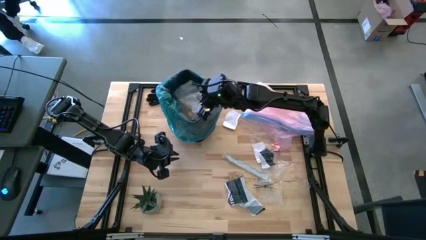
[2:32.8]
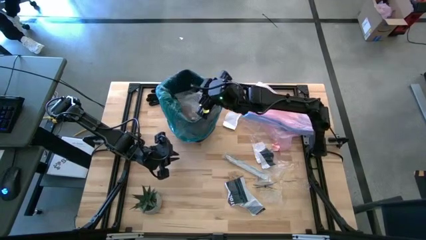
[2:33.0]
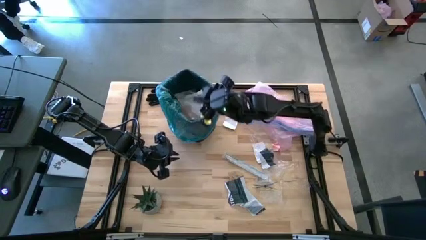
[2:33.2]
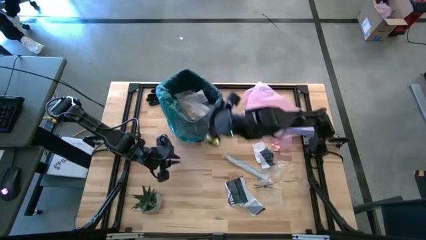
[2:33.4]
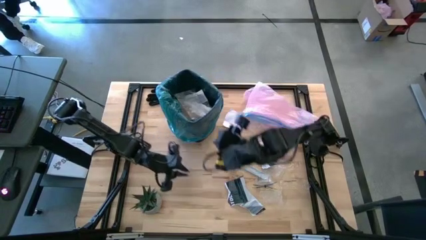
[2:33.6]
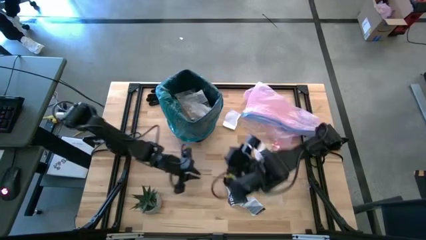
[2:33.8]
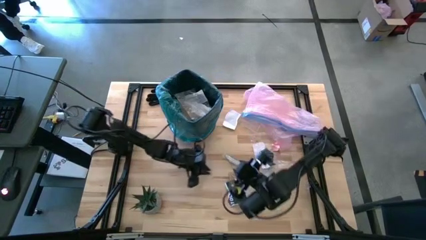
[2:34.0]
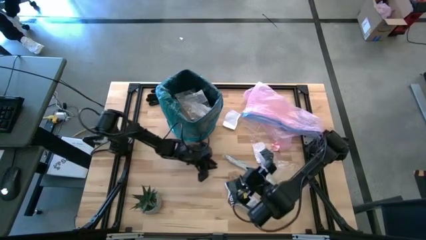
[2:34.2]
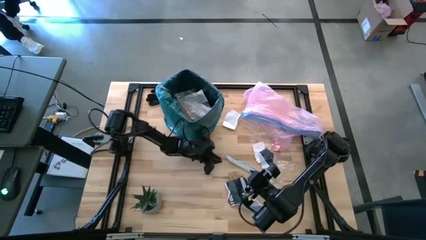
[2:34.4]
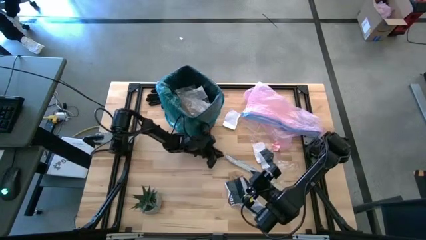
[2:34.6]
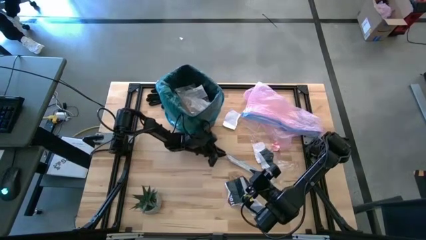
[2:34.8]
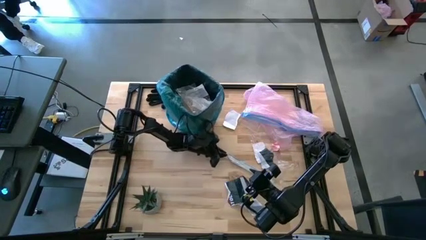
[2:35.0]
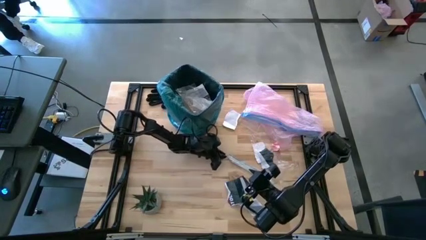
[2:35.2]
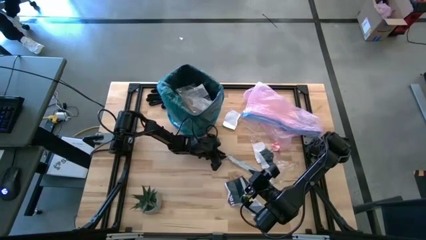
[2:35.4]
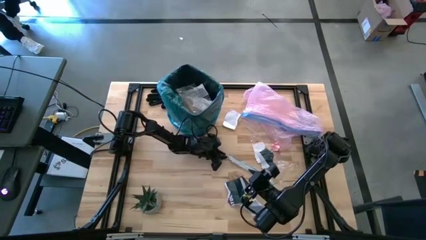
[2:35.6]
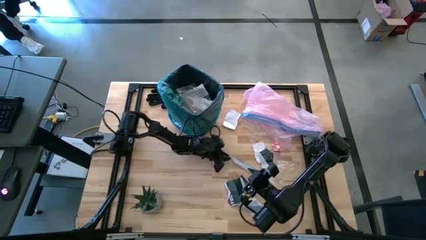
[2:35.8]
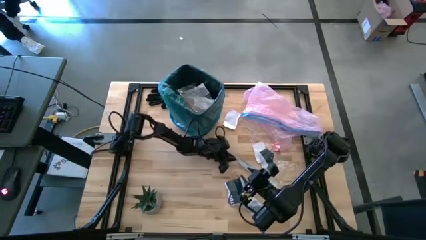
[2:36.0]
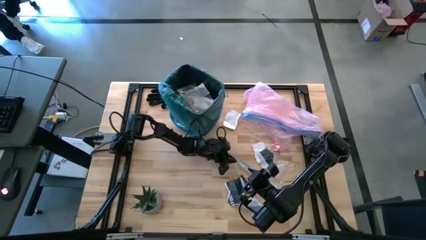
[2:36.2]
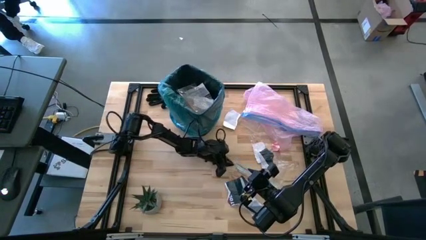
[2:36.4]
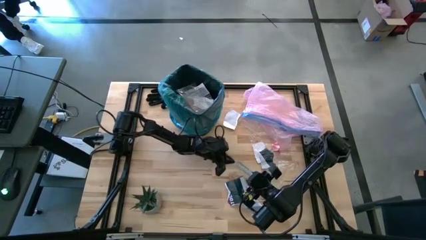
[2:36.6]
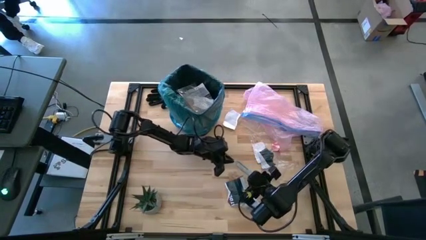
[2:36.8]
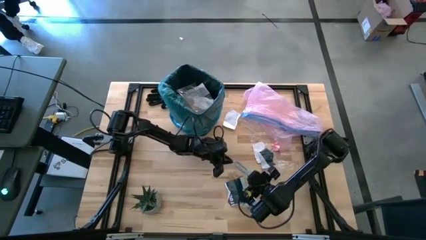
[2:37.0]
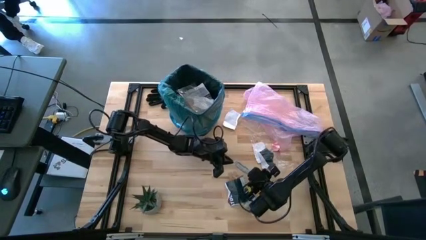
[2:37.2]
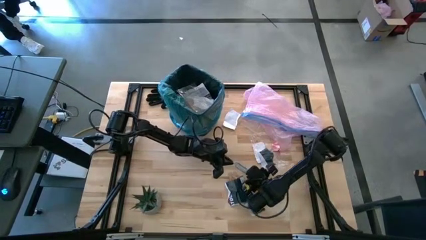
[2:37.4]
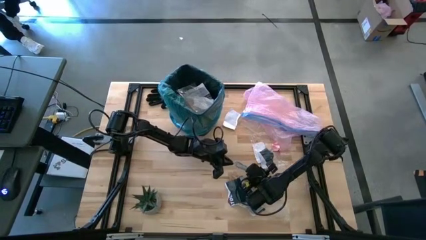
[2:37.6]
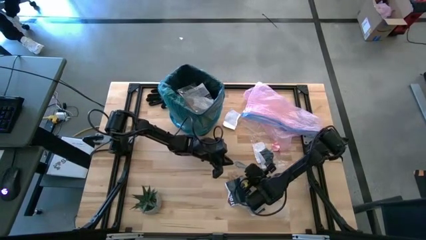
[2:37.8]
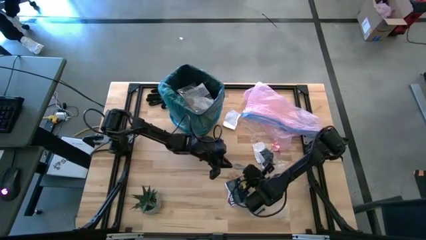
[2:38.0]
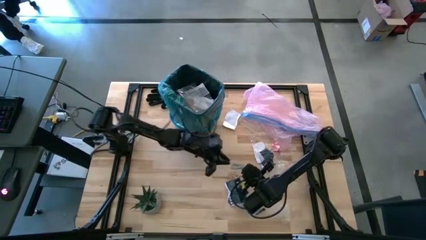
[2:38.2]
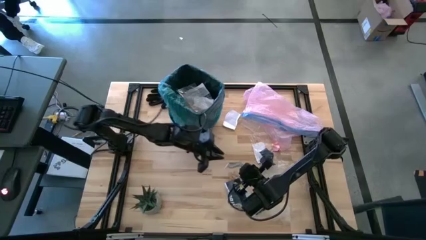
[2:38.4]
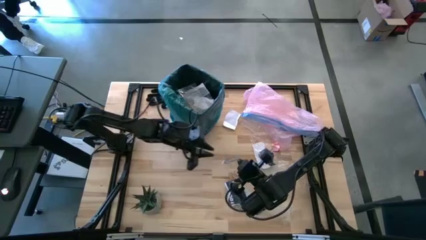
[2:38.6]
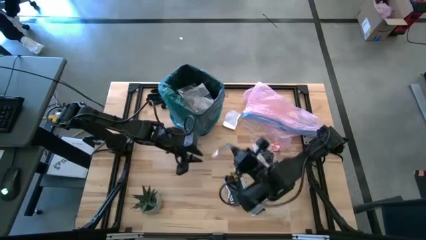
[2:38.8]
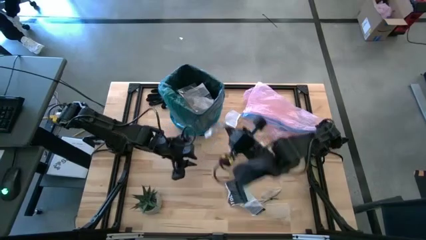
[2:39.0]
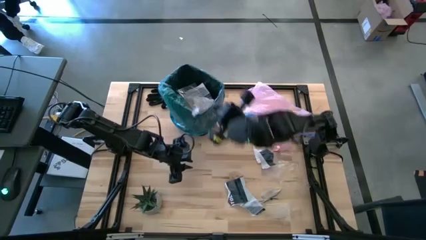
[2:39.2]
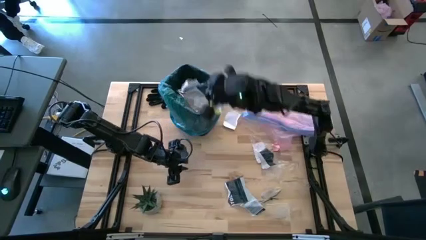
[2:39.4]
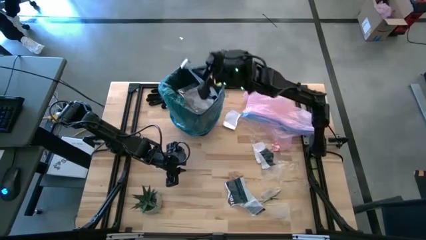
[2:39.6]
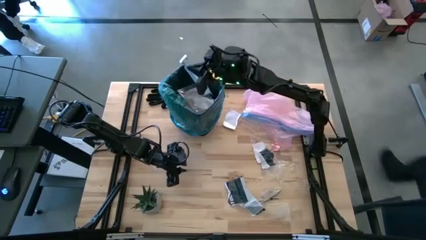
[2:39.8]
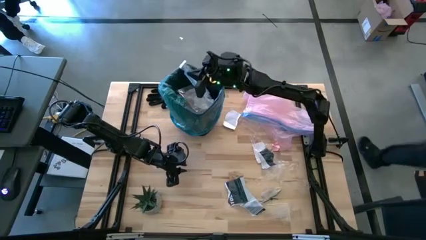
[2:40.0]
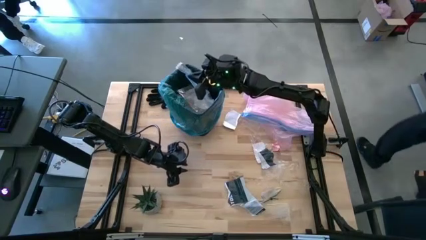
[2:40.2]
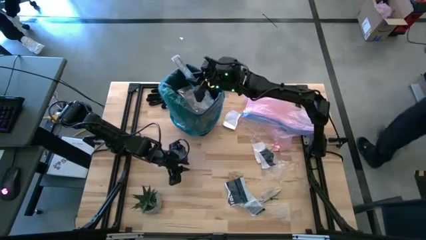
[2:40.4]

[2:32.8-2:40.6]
Task: place trash/remove bag and relplace
Put the colored plastic pack into the trash bin

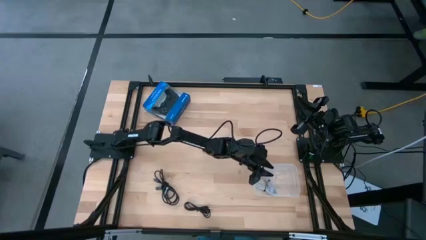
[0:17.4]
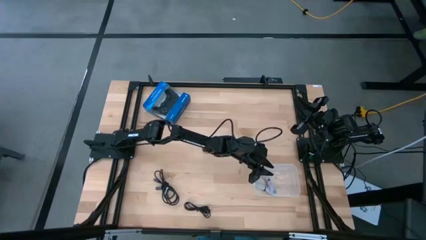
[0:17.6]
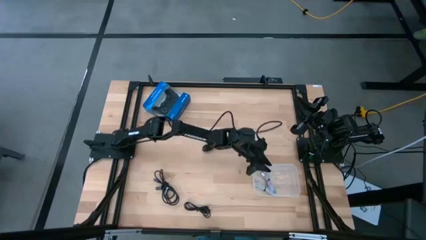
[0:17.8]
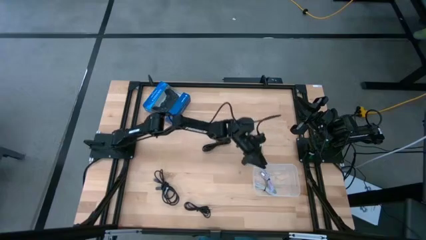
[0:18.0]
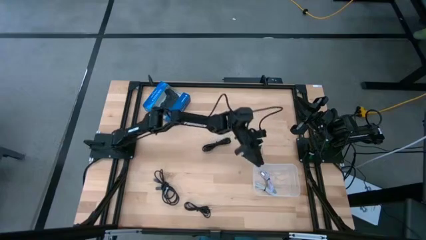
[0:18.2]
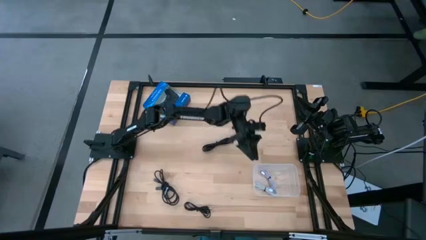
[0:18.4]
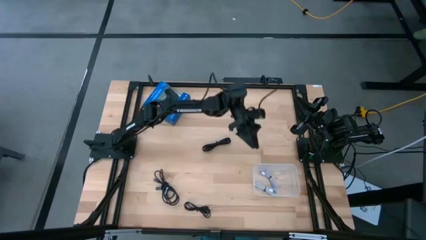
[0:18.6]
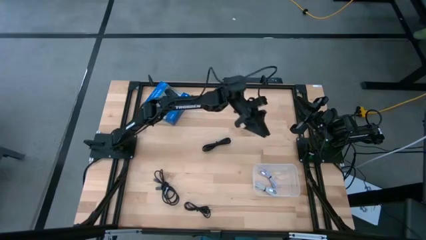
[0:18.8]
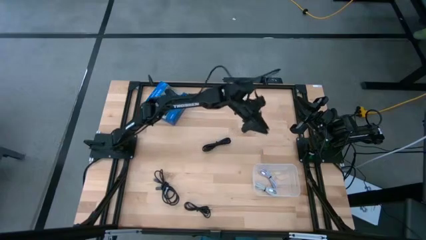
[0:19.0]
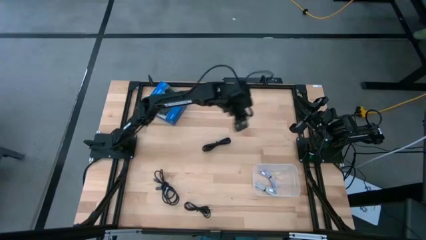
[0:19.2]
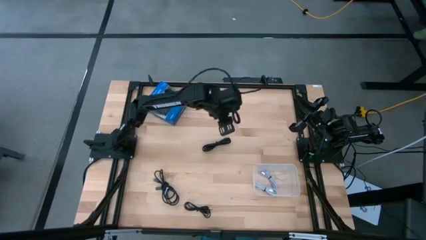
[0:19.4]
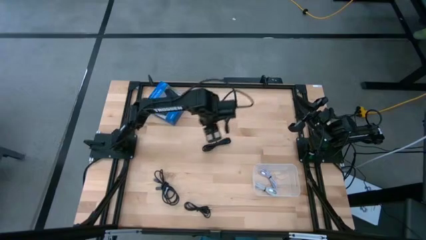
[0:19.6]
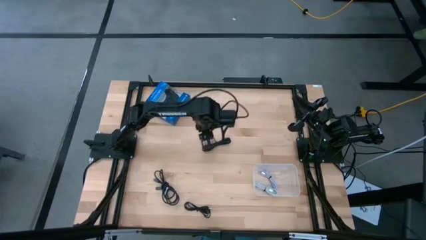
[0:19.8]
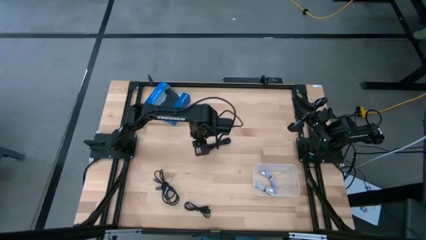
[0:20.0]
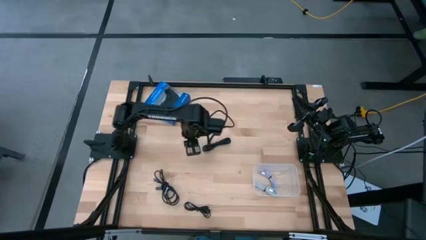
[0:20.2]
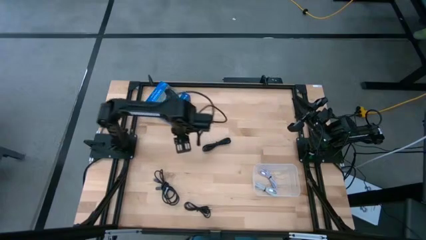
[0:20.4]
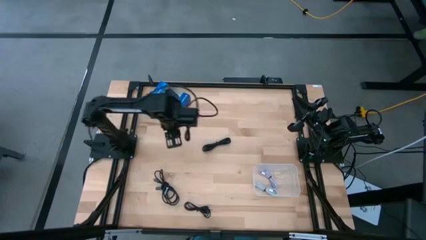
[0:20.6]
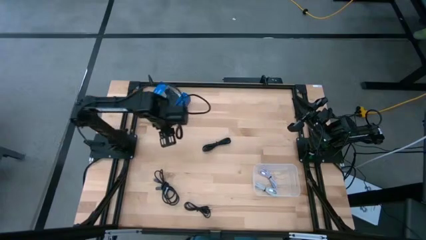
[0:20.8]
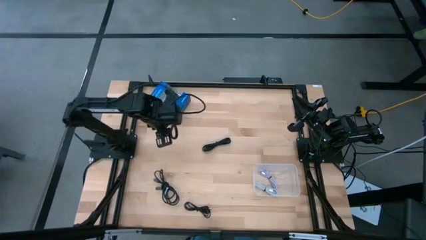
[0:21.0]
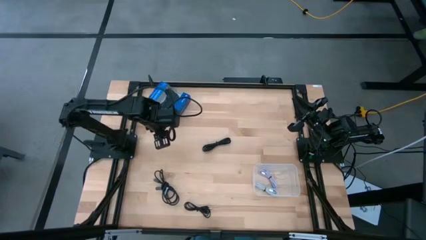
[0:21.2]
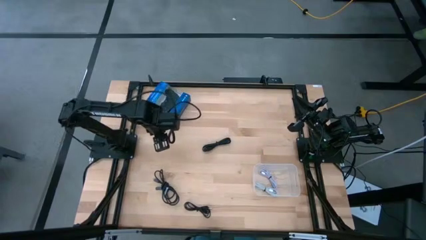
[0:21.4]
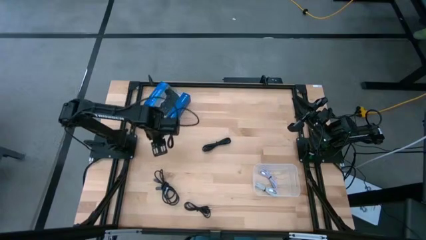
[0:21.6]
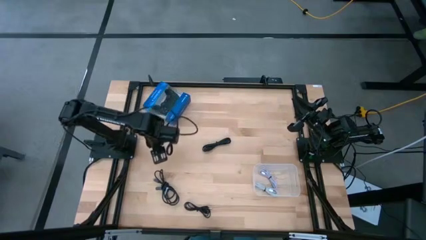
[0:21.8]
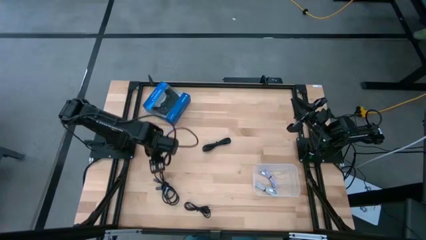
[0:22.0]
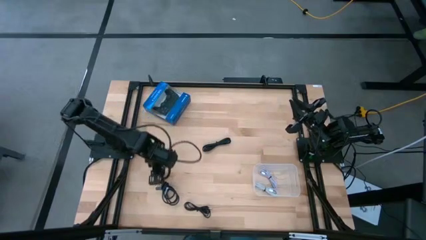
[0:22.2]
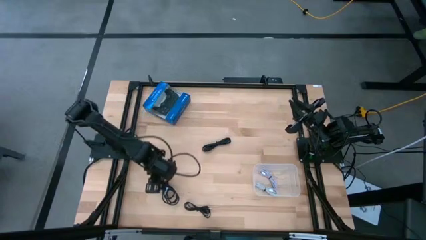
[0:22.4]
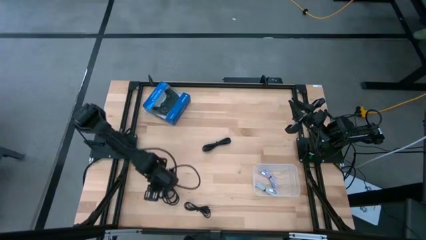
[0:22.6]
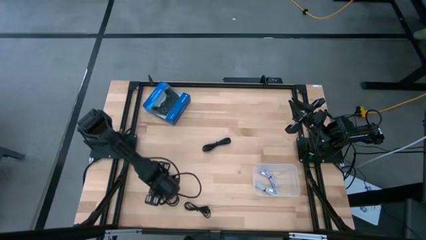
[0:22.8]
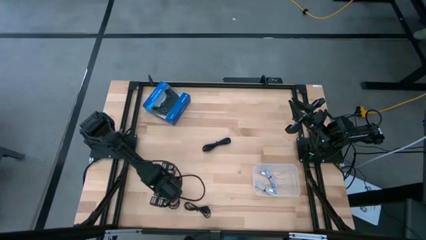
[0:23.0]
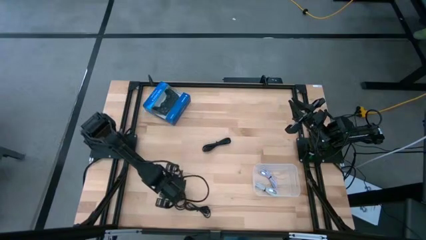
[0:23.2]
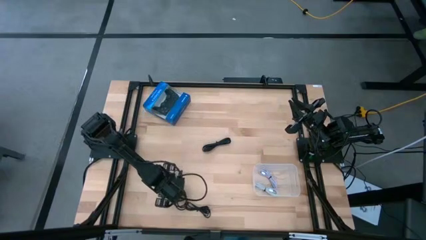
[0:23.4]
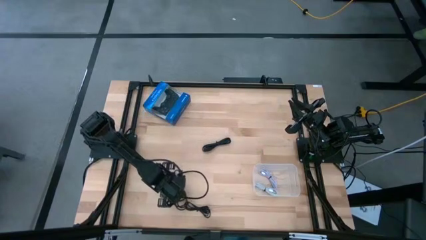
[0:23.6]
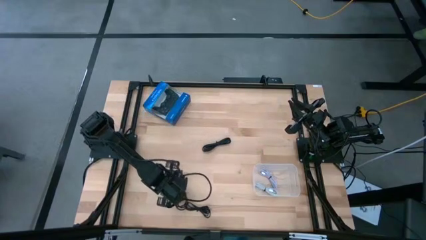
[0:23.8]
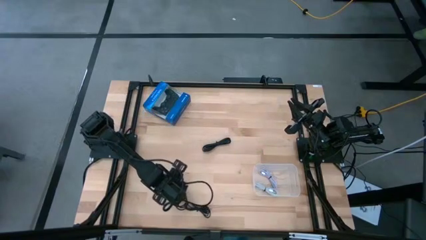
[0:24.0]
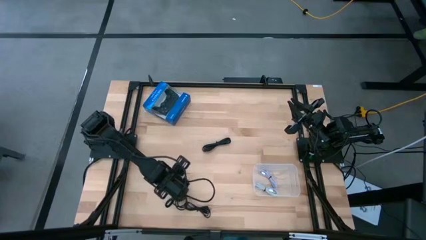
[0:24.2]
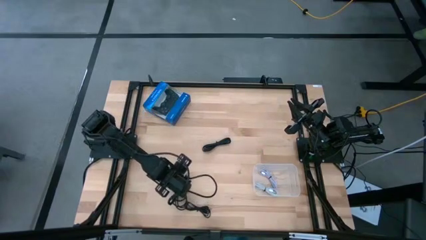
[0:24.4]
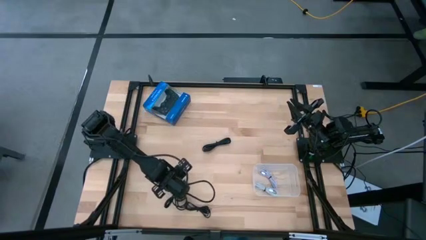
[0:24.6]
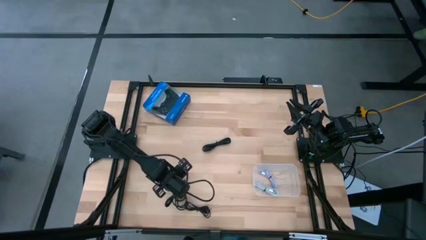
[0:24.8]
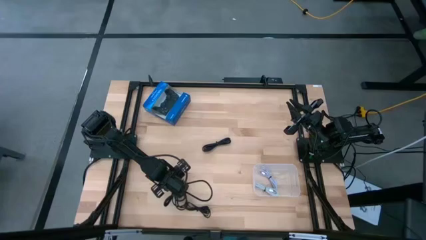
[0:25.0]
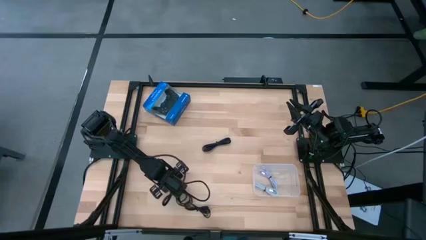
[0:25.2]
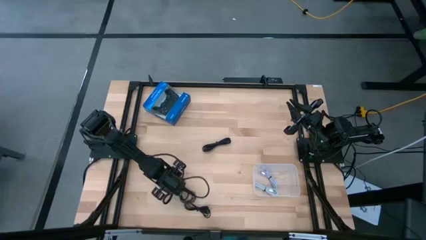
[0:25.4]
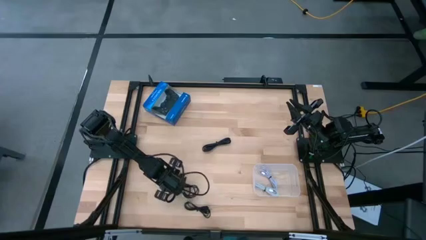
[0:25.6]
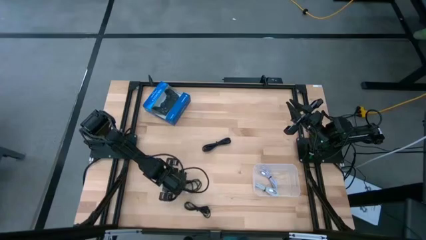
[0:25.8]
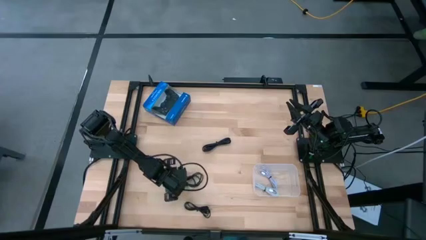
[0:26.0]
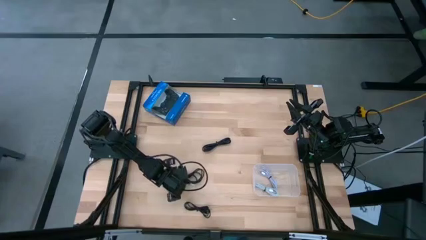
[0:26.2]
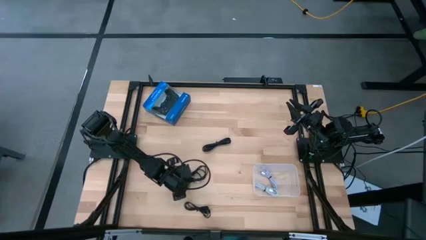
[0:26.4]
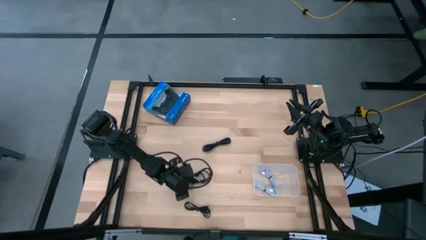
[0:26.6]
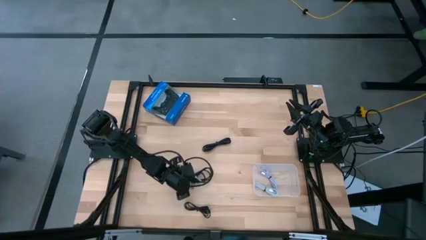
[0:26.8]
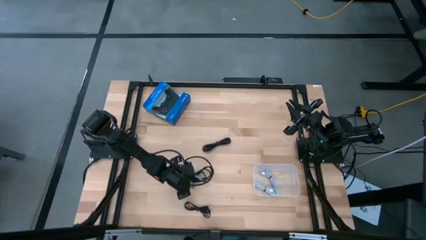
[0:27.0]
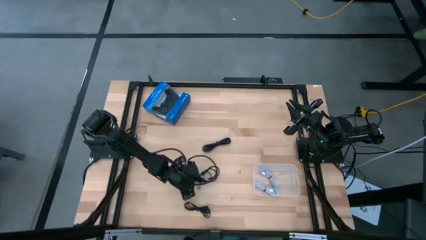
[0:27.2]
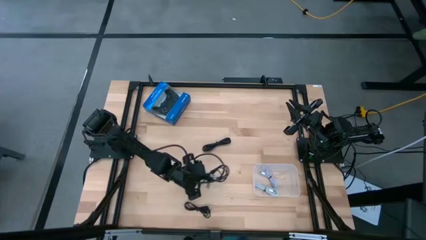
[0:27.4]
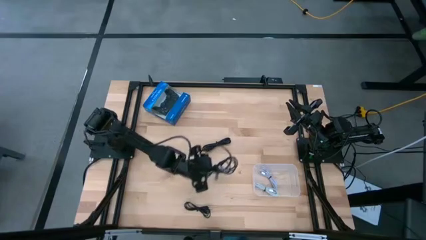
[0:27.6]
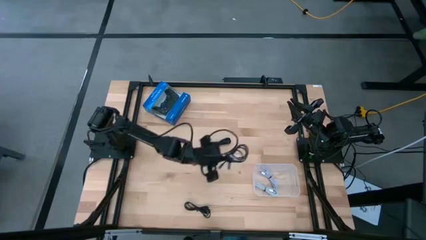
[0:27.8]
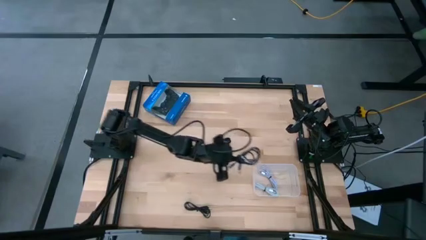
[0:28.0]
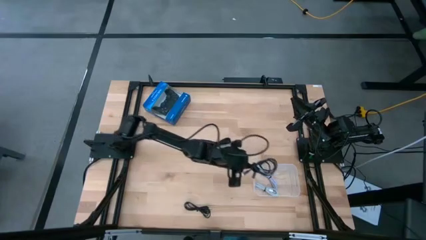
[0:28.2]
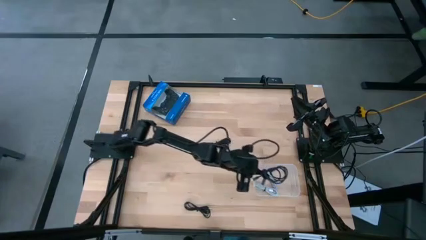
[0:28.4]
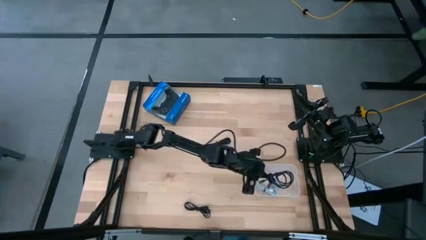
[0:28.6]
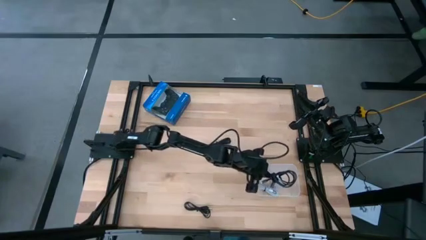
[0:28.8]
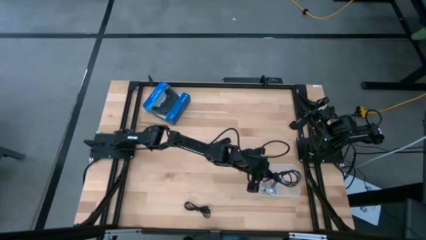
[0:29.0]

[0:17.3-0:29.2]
Task: Pick and place USB-C Cables
Put the middle black charger cable into the transparent container
